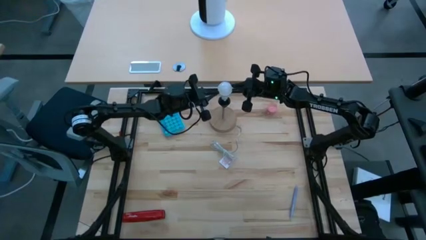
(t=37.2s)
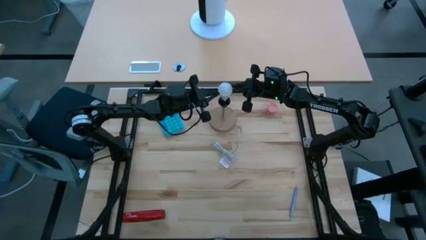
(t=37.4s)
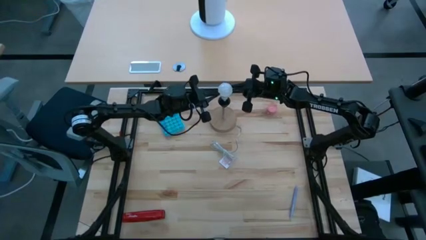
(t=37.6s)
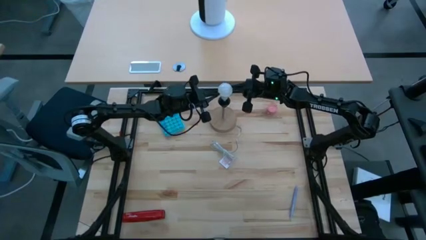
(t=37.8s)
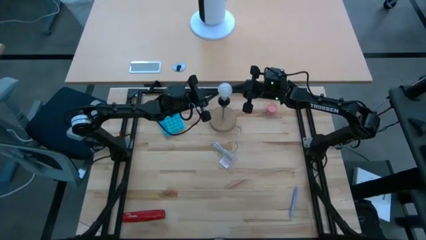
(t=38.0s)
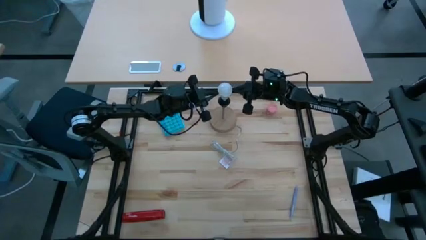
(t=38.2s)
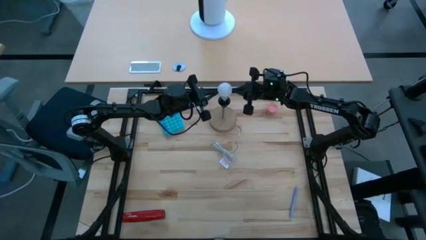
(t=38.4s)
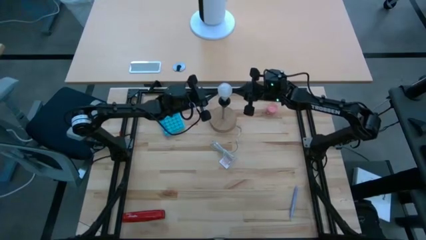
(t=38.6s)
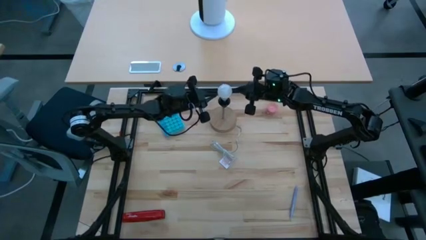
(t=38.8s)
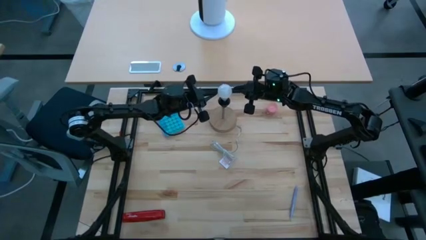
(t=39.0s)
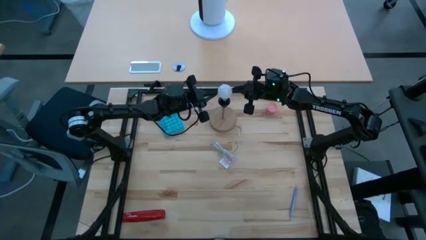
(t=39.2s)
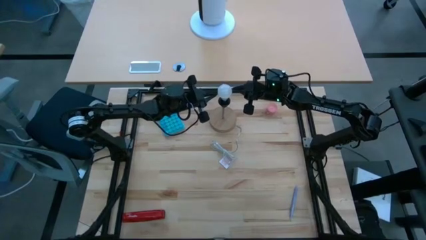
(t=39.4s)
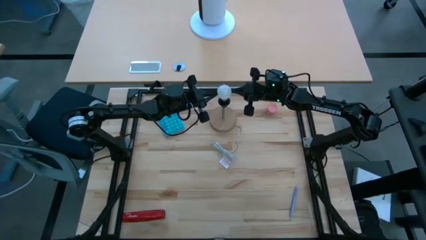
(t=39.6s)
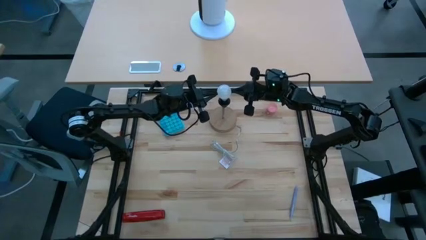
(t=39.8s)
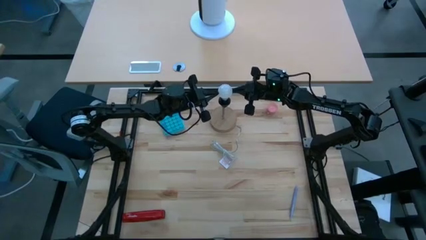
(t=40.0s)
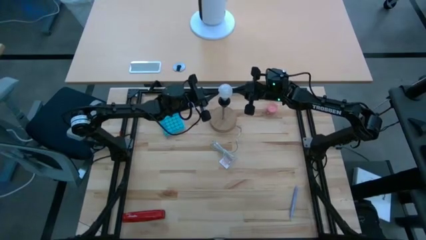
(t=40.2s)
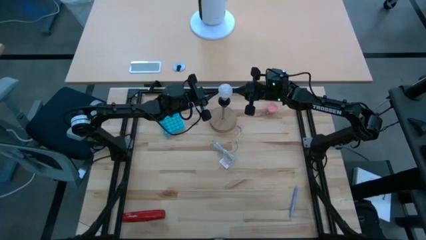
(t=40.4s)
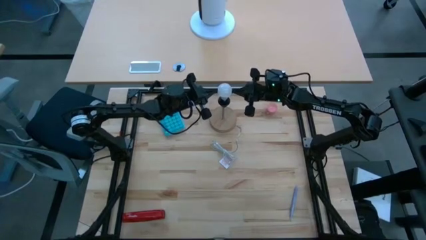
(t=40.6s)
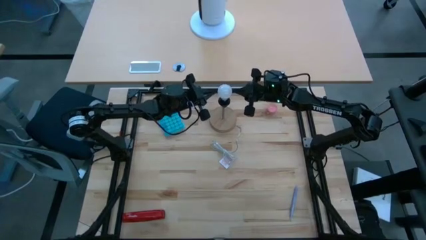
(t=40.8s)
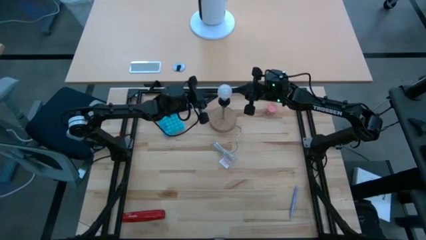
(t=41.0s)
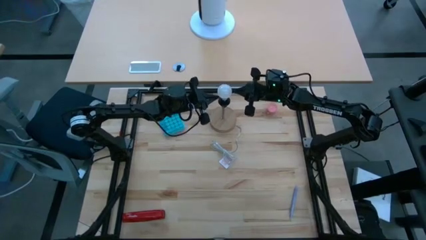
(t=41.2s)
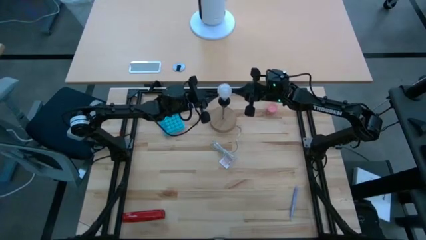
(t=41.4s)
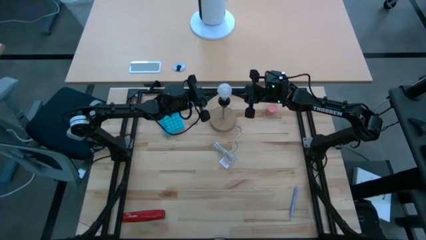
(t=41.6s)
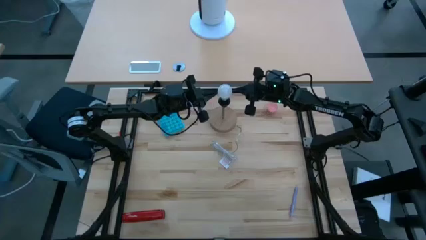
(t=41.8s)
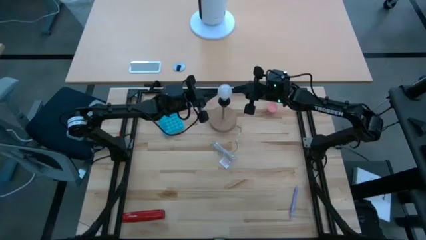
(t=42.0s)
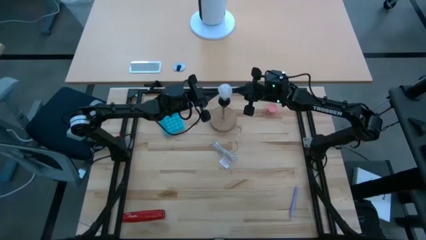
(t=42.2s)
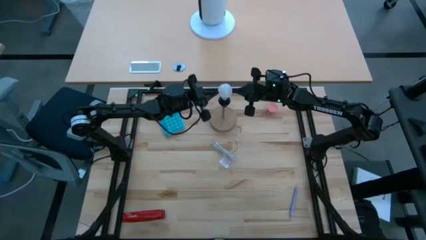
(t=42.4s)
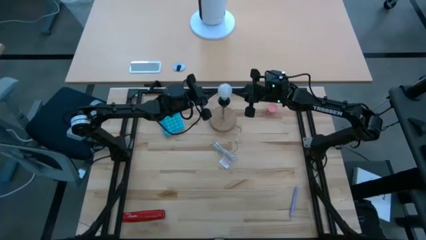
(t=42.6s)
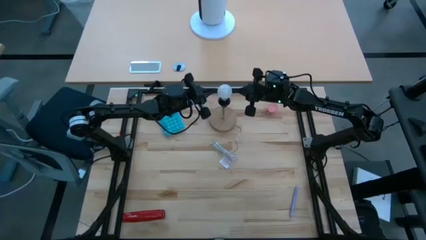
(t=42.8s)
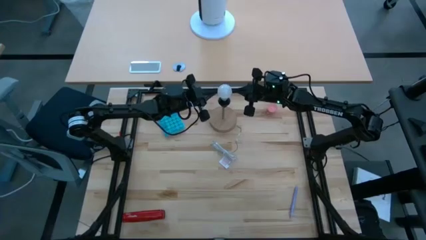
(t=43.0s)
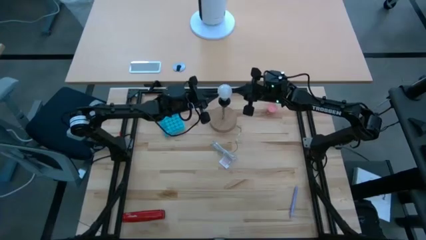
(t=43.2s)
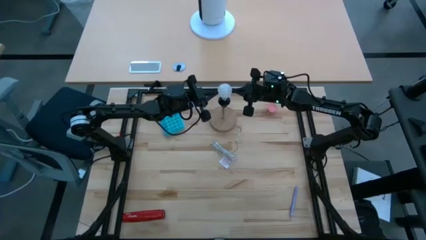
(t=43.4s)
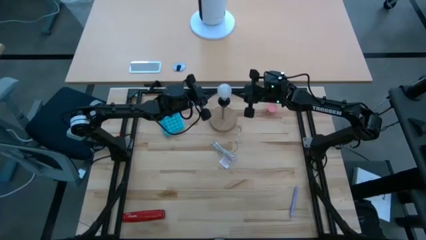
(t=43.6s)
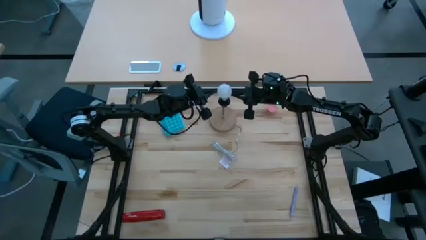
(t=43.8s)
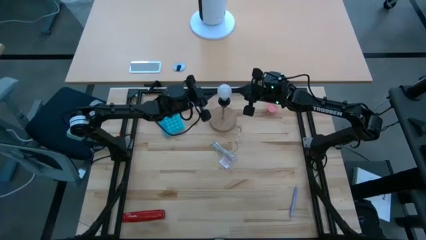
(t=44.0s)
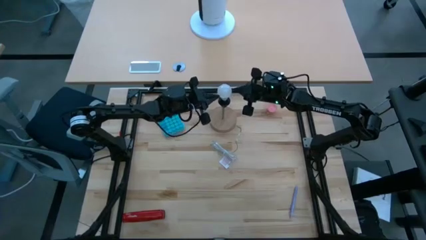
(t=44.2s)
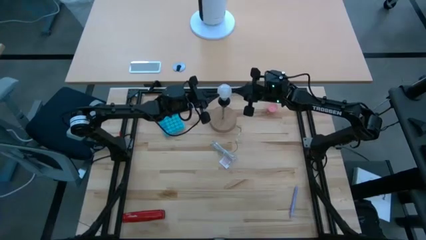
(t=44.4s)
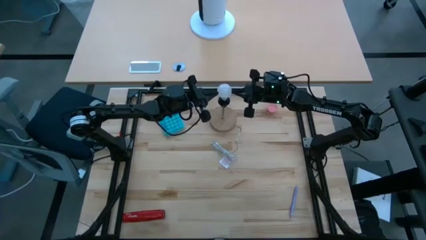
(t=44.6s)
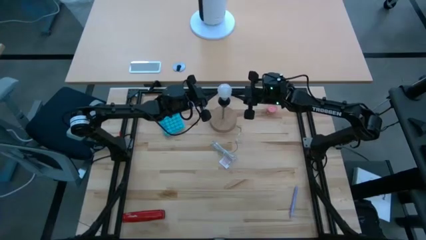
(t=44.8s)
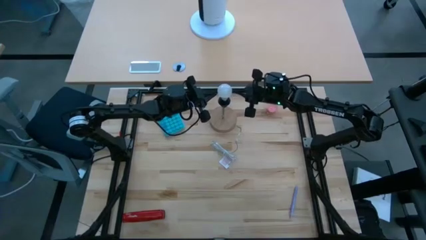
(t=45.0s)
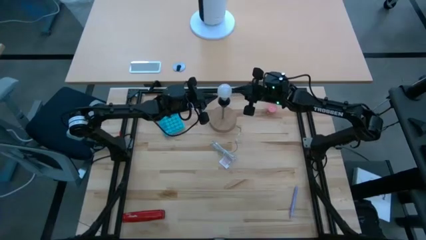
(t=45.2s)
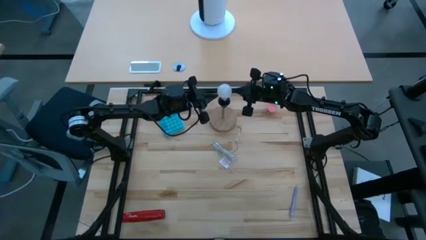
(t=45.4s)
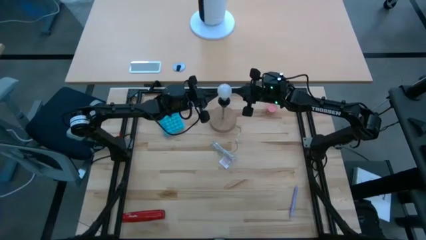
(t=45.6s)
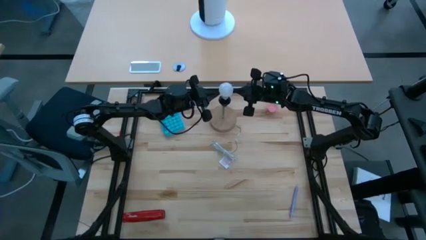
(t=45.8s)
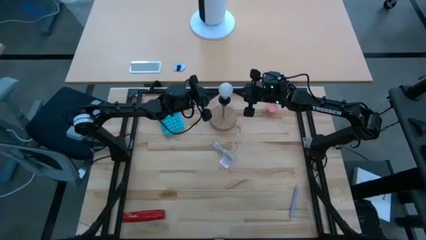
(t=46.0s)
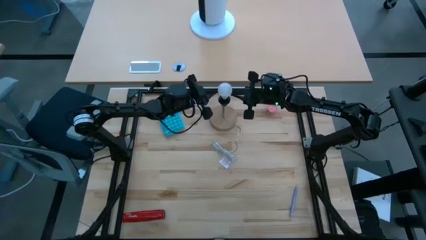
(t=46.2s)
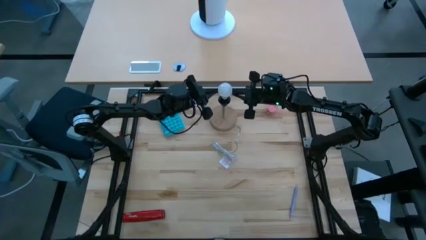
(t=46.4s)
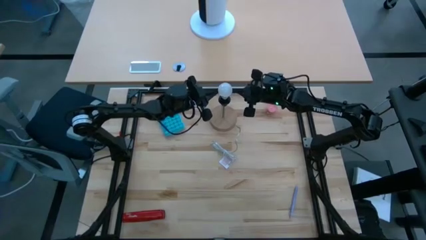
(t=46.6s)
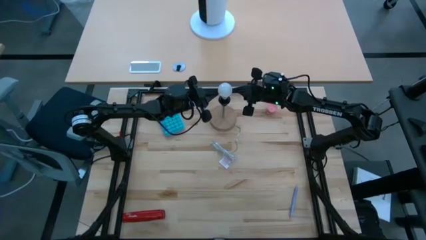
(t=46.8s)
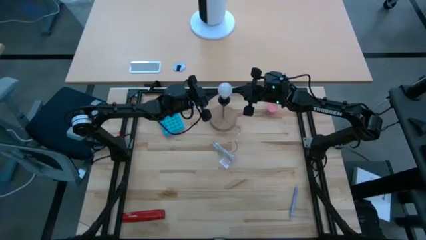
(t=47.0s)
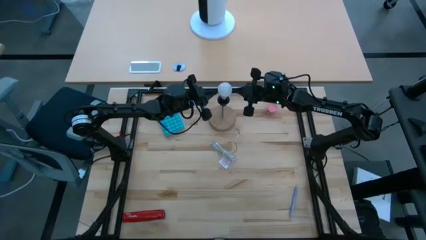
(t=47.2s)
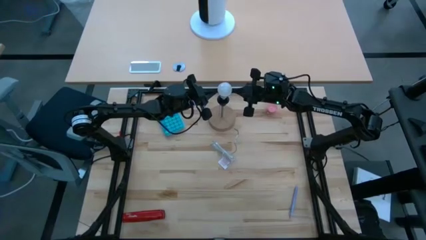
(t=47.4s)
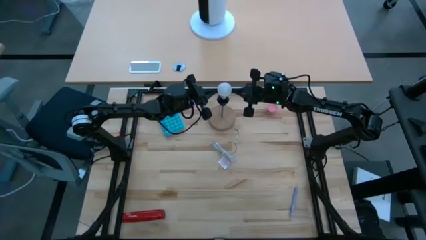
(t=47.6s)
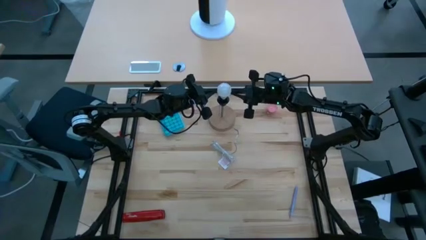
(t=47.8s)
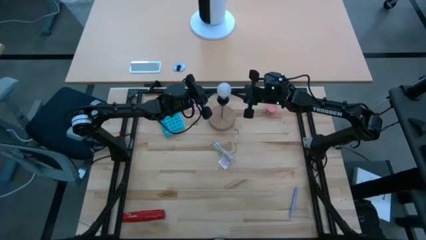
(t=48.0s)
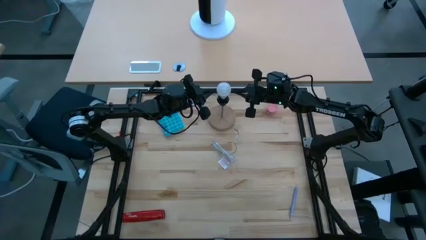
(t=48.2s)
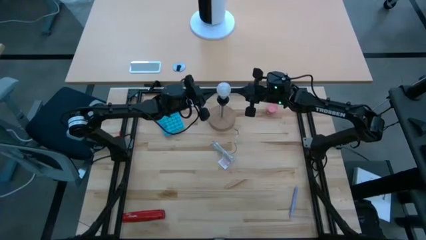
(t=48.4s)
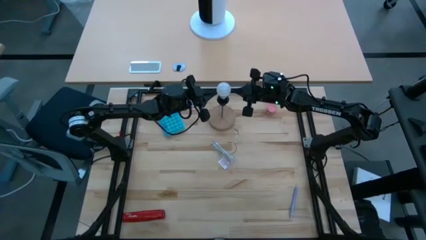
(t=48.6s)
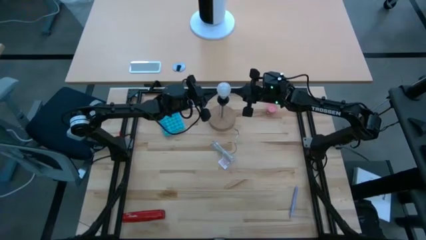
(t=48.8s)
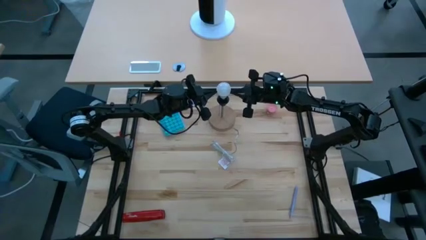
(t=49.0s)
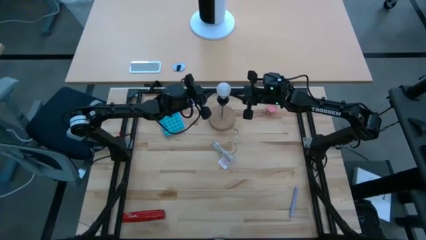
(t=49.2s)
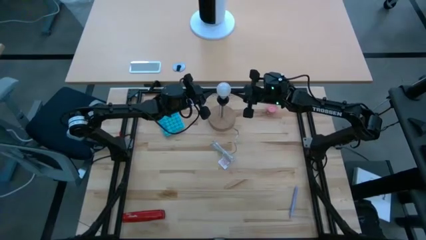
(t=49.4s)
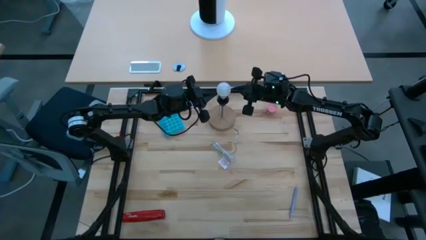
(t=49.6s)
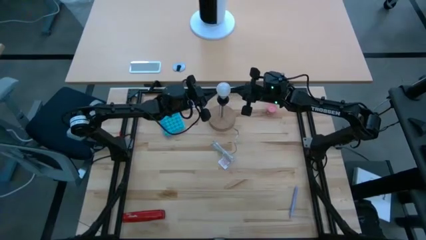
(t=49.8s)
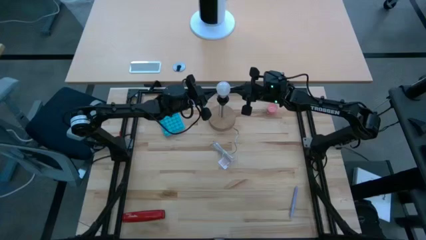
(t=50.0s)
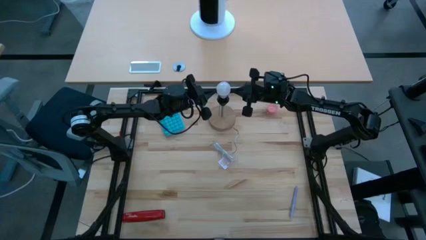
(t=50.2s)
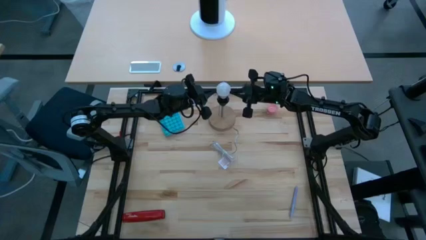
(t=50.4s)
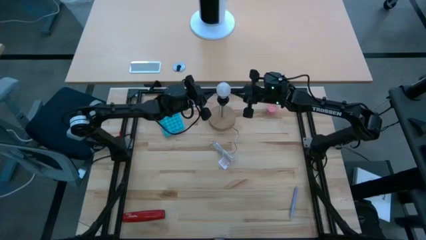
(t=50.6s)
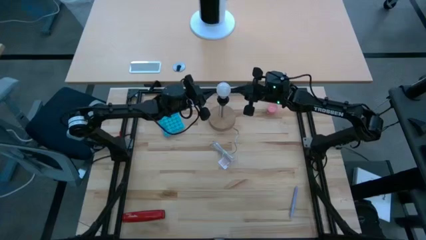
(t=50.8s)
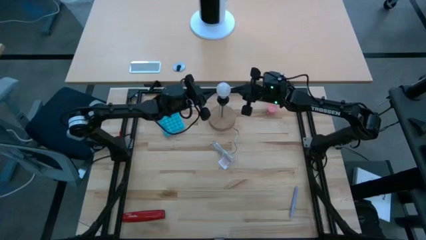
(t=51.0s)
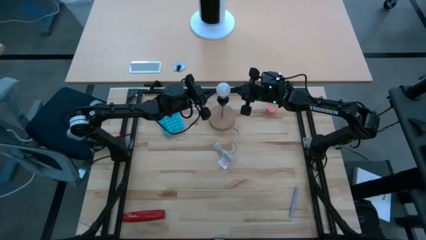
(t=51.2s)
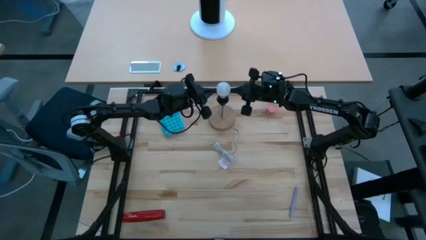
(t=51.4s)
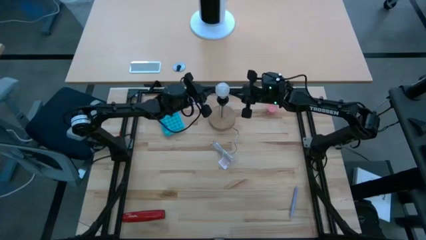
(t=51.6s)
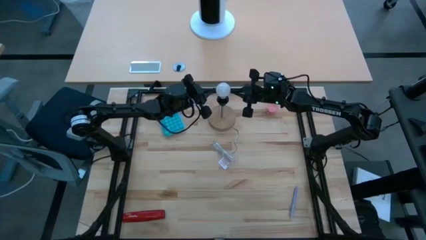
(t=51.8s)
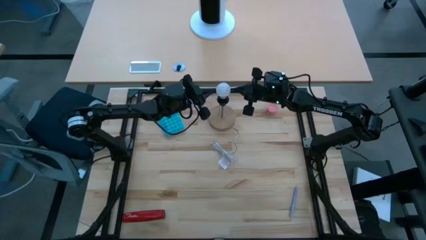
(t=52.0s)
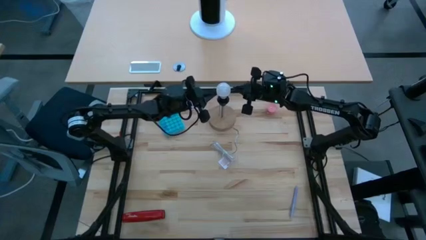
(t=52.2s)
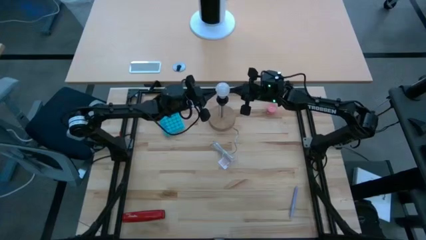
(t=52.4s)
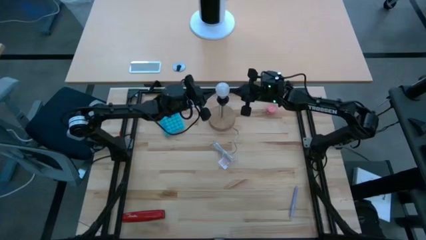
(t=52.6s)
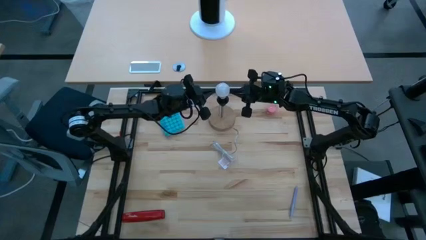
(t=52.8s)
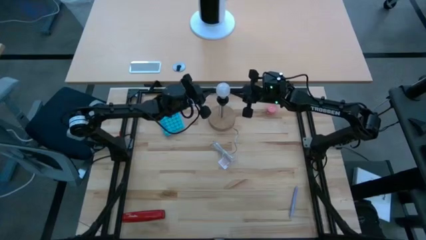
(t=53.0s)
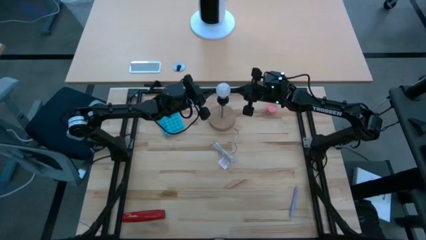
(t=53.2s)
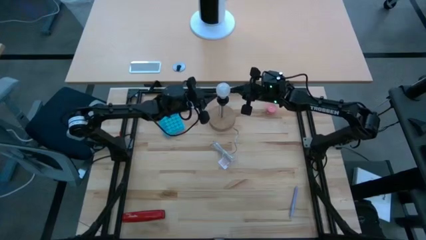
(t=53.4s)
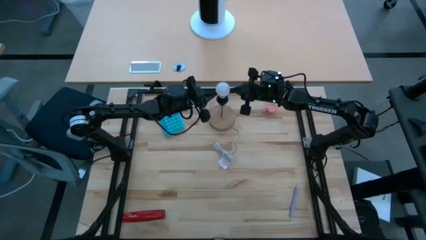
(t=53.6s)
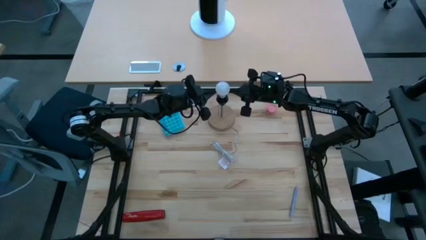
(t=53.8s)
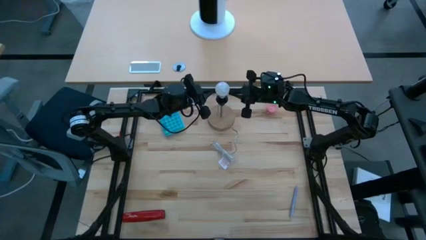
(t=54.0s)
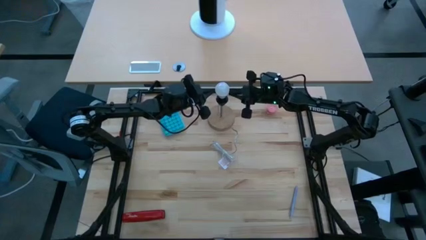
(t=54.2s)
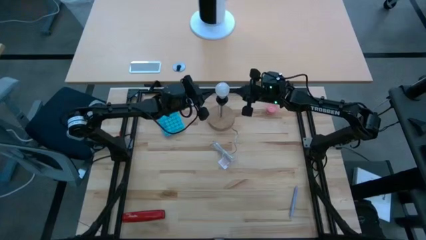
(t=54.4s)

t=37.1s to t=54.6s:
Task: Screw lightbulb
Insert the light bulb into the desk lamp
